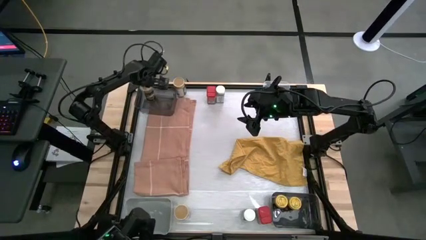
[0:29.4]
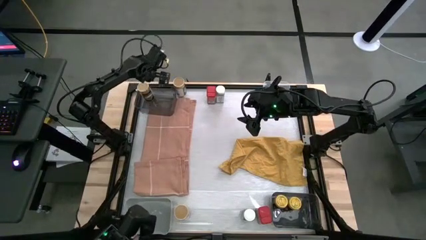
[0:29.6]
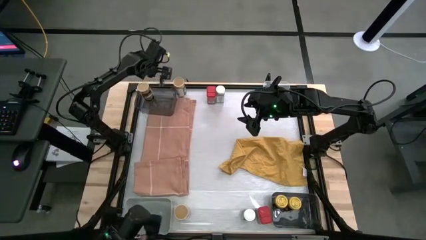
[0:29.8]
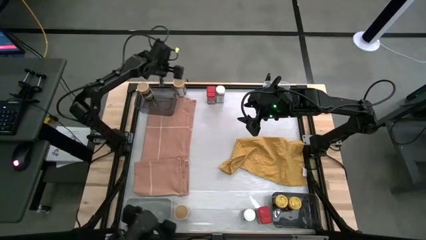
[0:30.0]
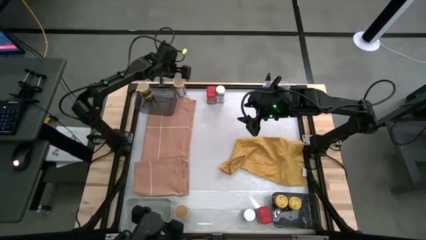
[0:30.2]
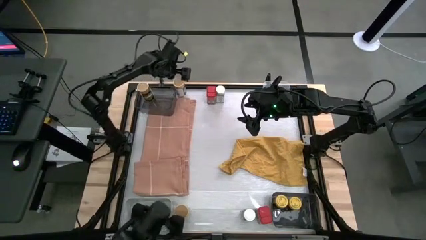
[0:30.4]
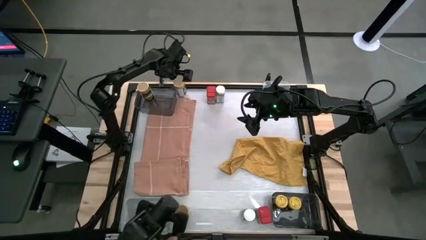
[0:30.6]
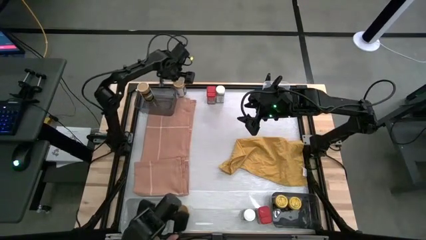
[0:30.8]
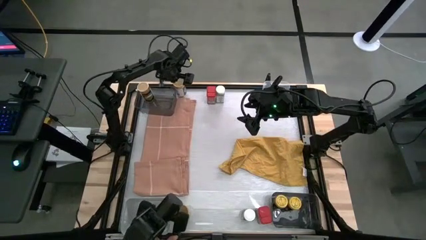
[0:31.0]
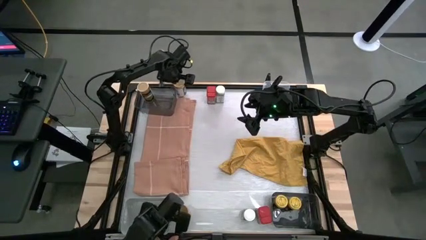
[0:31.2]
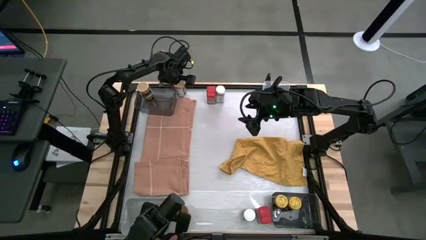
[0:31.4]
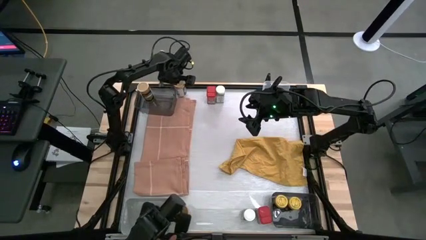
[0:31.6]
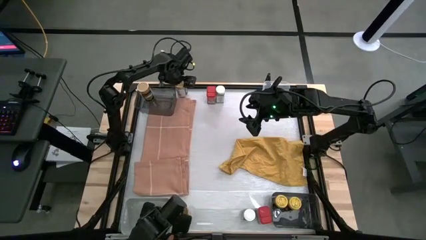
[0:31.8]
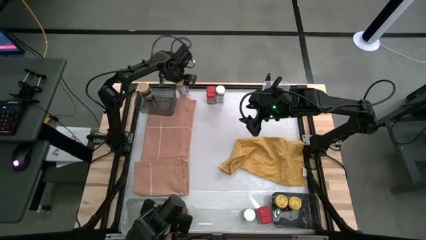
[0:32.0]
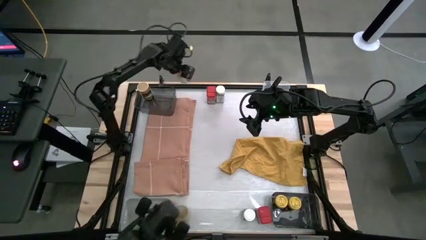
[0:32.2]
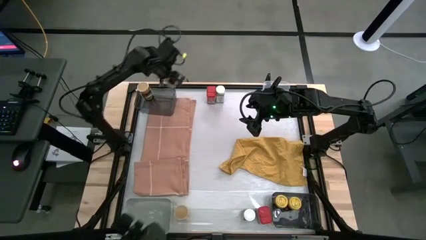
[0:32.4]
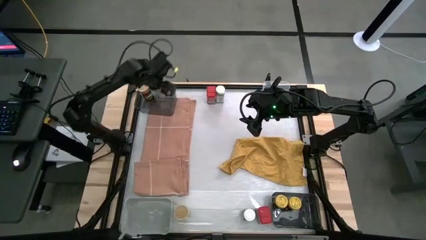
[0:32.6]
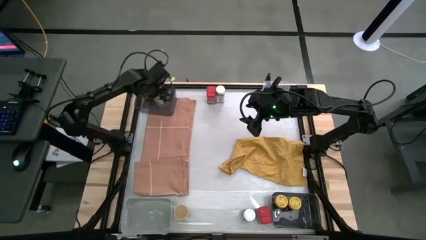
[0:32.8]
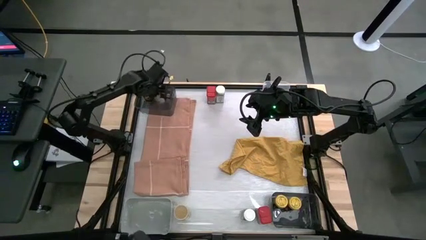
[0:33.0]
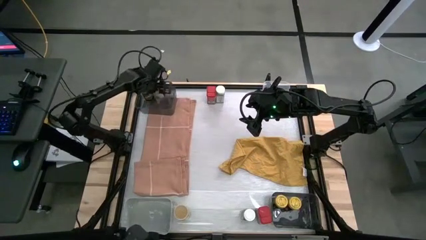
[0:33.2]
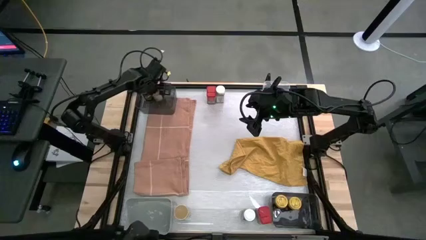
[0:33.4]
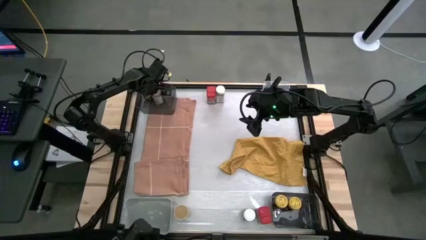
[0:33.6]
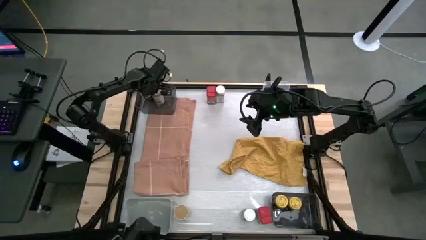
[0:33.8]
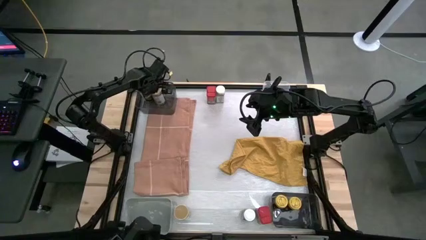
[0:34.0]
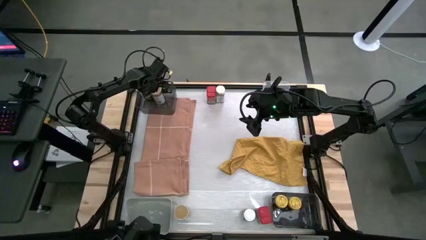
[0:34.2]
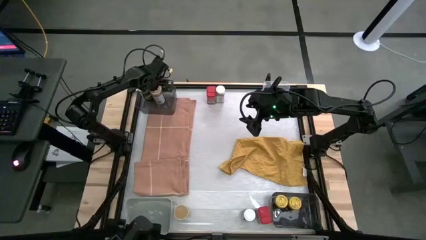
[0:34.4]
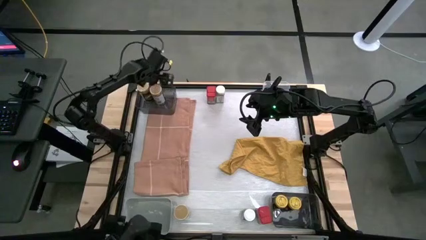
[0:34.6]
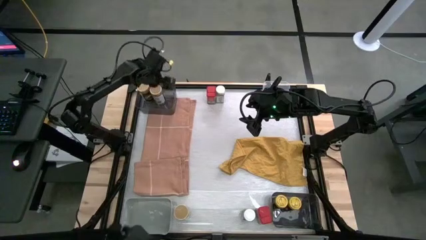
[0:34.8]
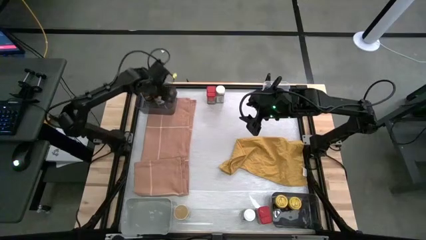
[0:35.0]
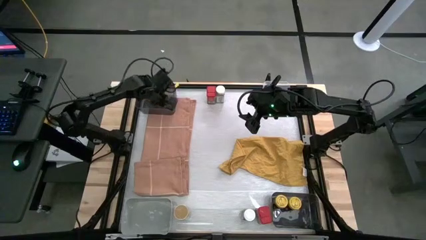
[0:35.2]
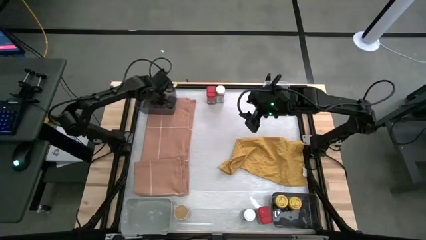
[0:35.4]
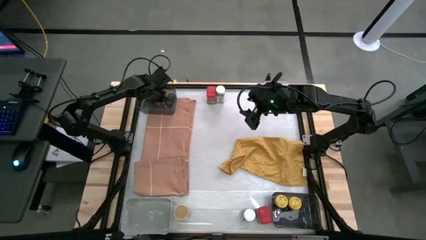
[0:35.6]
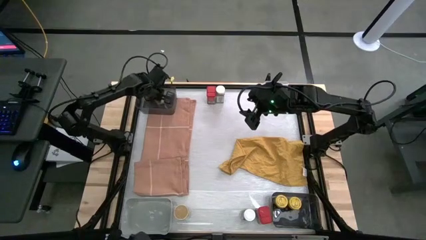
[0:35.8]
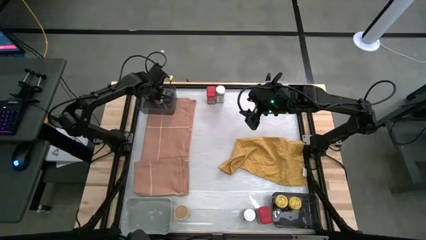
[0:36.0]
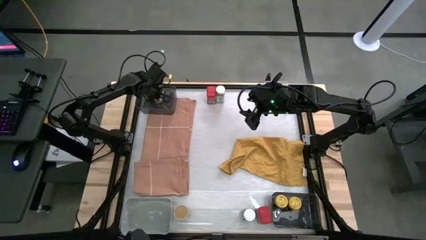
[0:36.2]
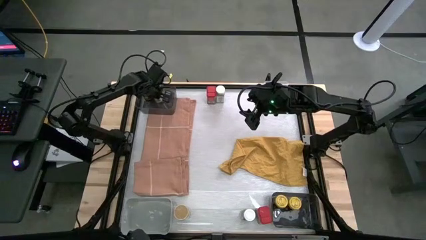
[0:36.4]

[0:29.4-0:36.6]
Task: Sort spices by type
Put the top gold seasoning bottle into the top black bin

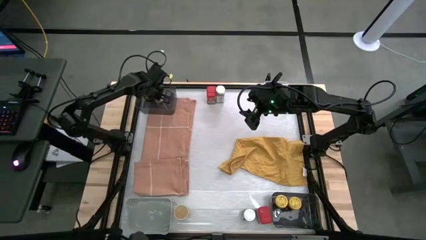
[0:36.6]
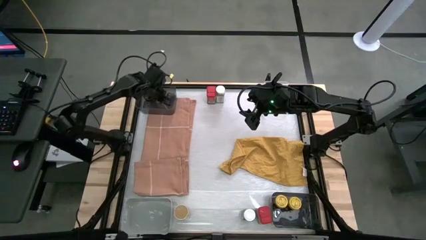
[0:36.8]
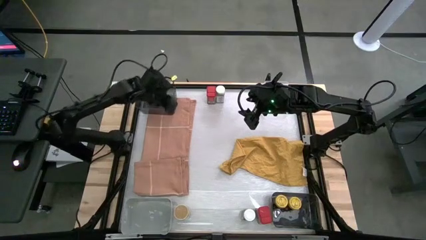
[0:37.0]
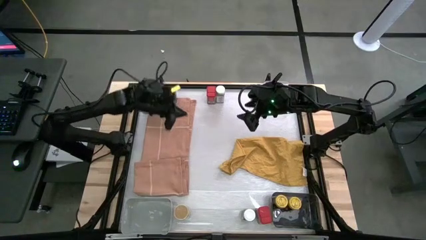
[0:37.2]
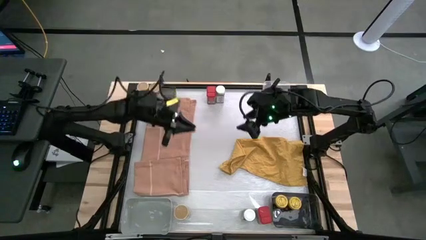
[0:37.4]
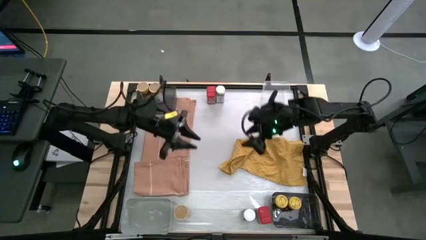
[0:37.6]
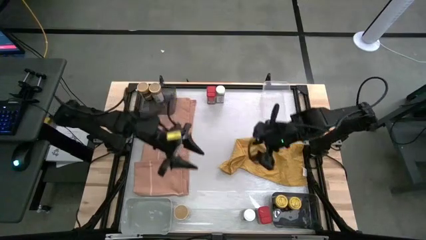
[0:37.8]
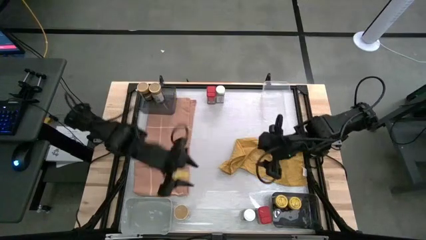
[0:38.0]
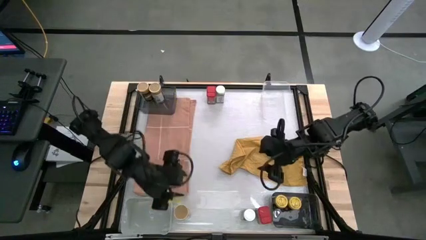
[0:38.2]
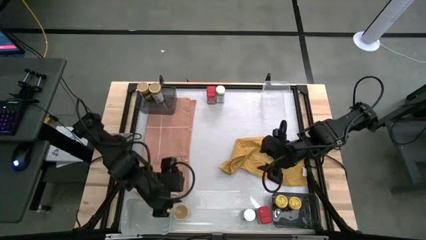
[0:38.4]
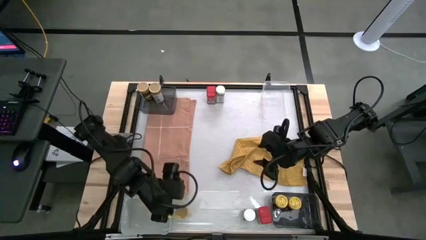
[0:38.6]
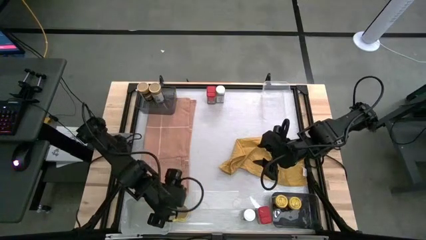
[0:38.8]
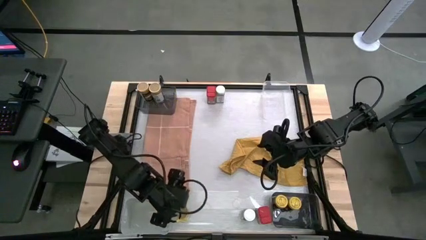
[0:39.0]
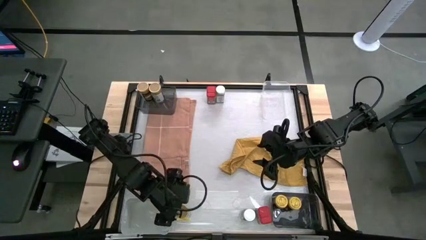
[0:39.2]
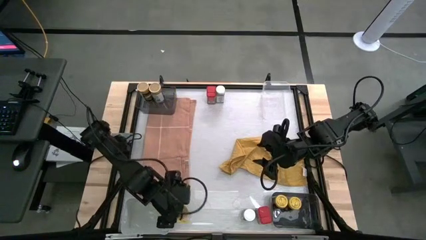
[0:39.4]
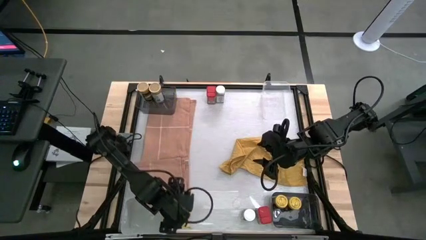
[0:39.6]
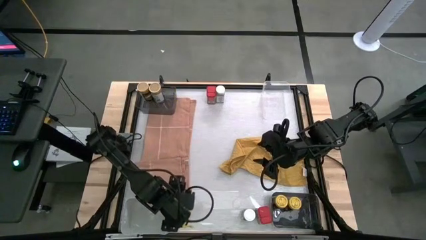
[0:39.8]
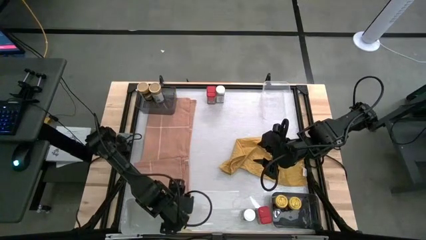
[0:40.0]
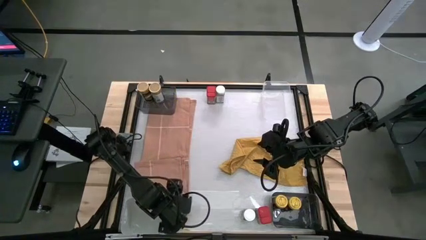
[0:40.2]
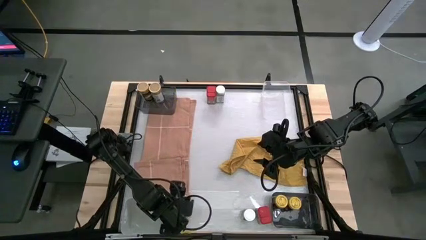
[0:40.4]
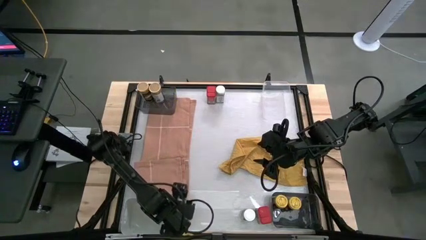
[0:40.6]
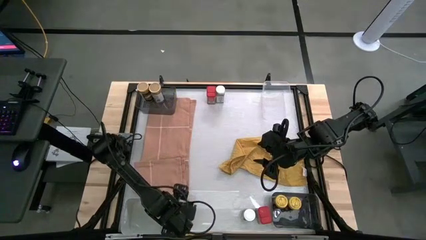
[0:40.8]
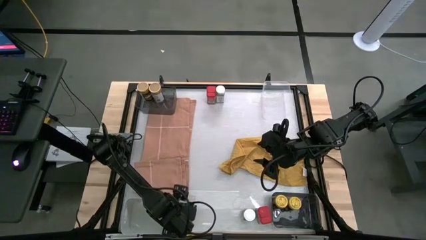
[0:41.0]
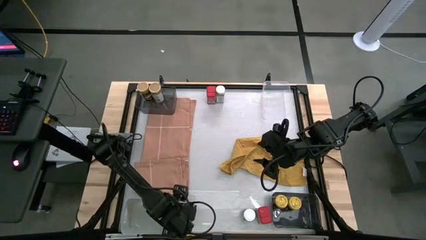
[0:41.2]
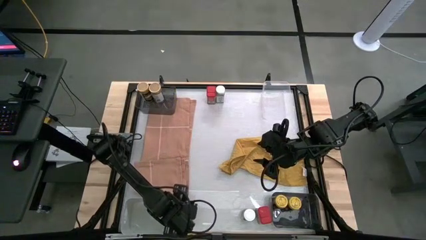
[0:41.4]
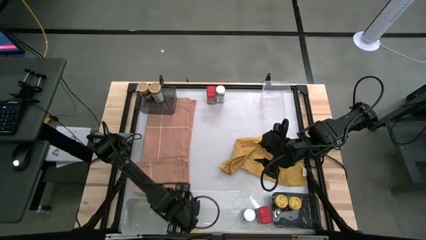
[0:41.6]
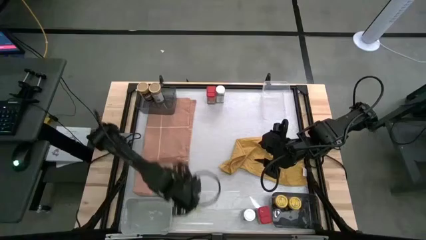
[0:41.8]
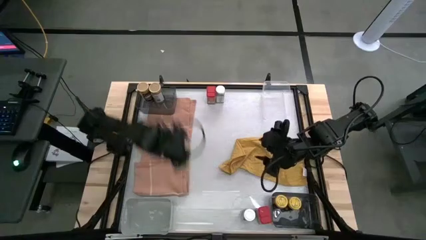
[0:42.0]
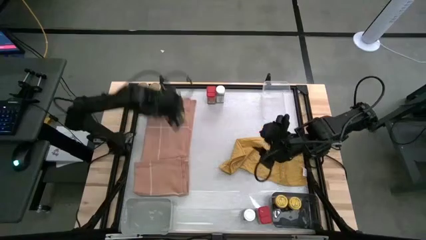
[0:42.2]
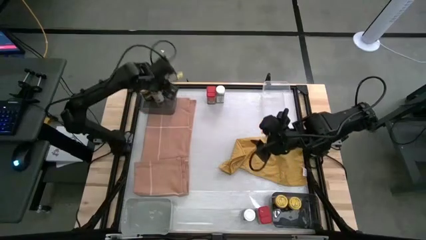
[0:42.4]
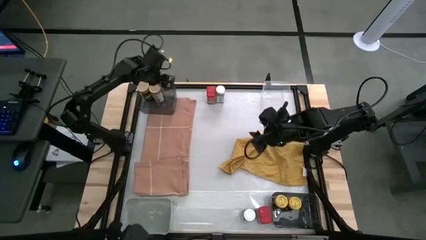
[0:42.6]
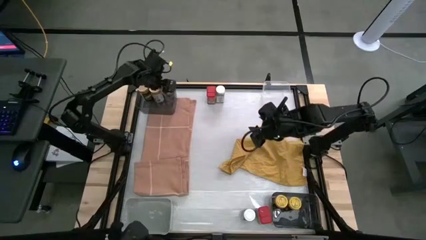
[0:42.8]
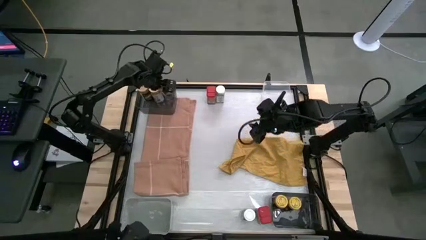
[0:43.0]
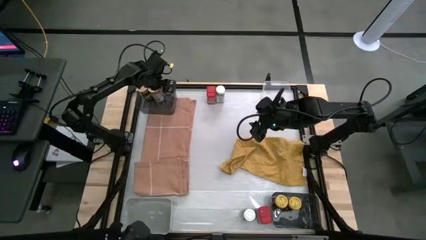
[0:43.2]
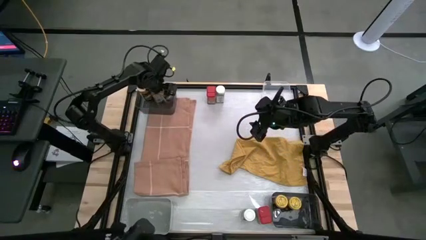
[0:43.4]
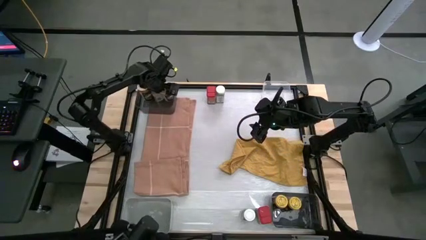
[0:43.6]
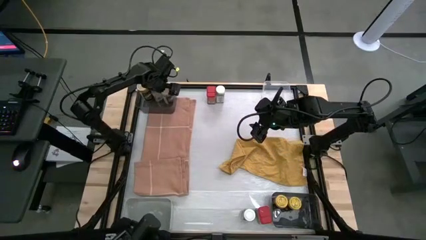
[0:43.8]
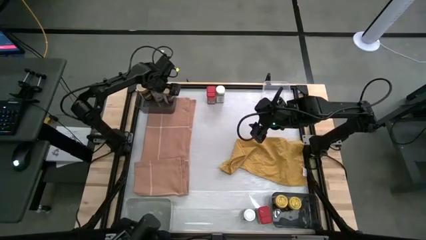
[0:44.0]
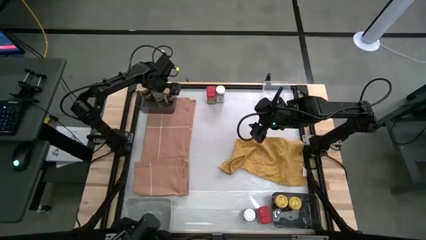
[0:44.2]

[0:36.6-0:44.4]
Put the gold seasoning bottle into the top black bin

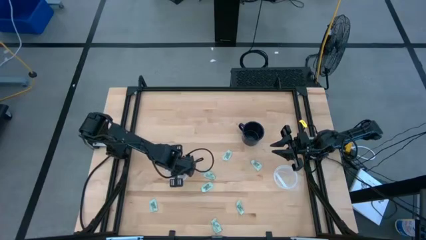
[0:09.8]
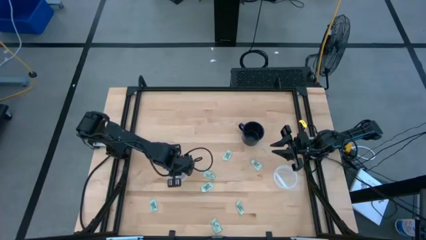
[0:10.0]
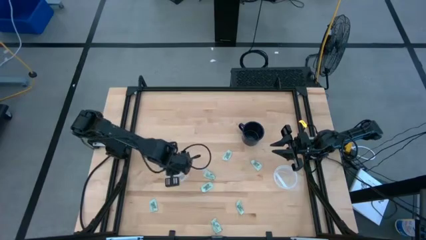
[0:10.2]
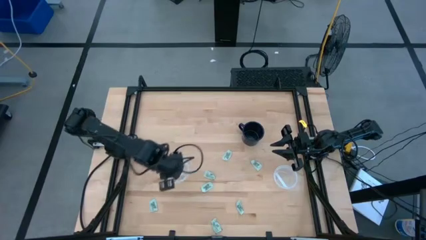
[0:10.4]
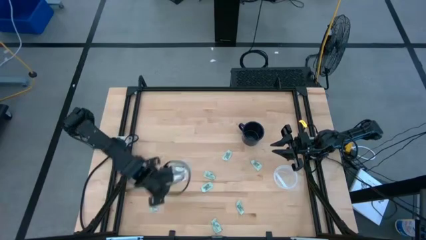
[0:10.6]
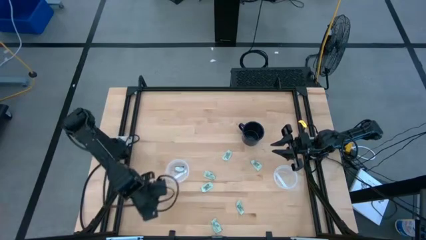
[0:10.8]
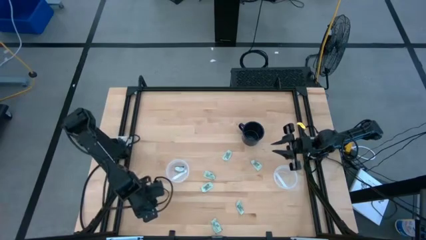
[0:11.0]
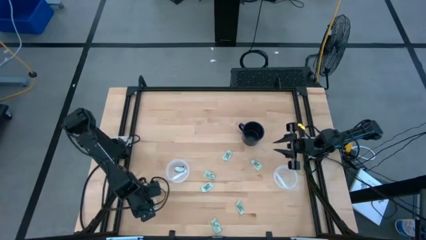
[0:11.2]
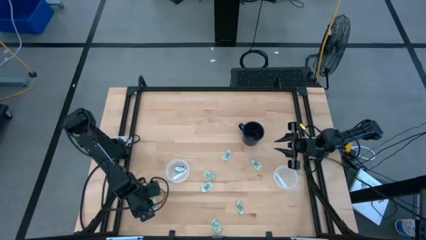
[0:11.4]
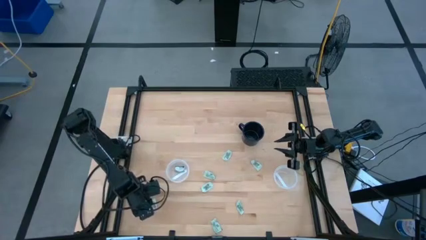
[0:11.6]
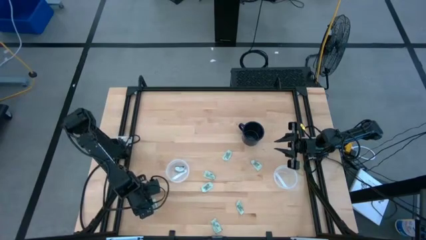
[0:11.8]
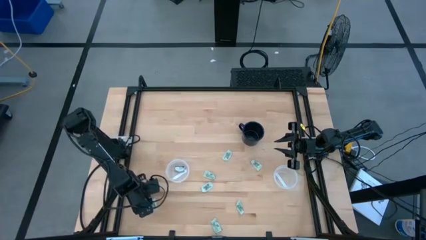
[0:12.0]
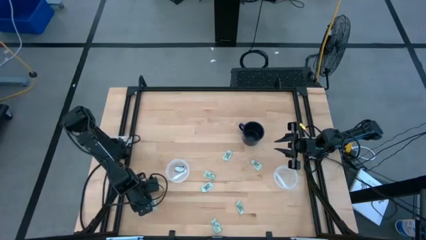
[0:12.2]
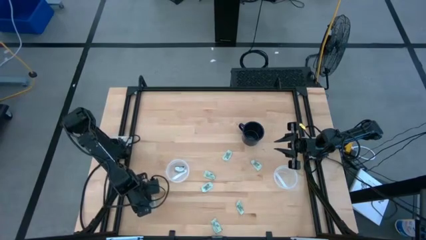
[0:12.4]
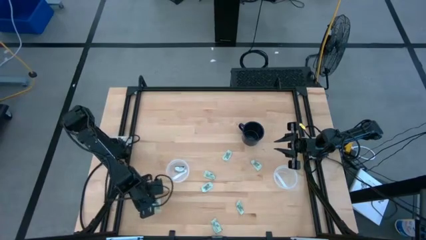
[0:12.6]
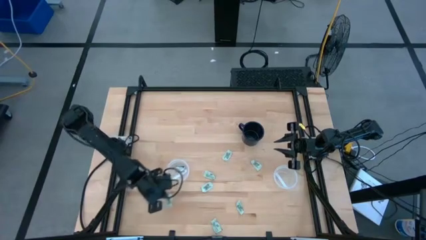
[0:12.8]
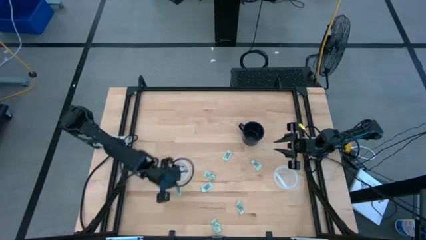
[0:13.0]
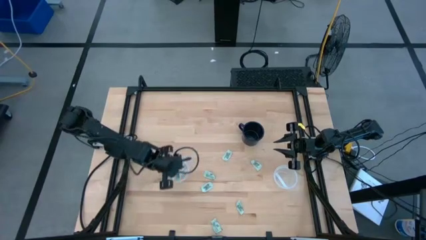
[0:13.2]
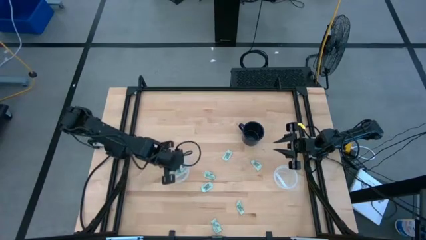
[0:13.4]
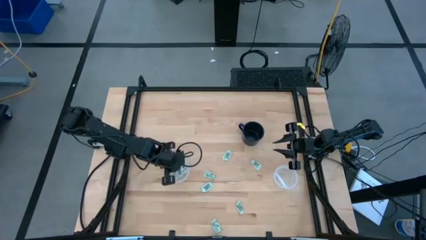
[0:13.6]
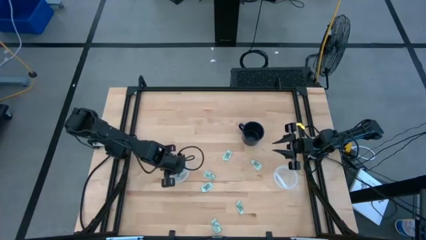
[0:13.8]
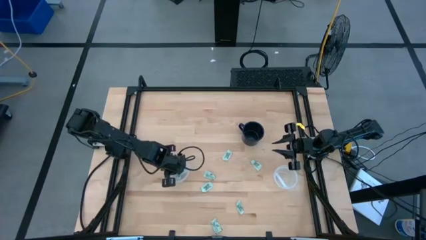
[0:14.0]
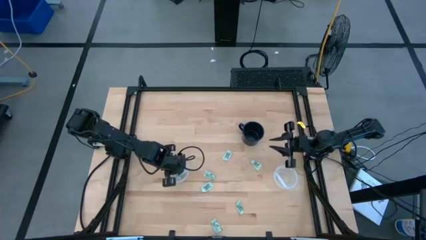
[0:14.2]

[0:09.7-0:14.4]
Task: Pick and place Stevia / Truvia into bins
Put the stevia packet into the left transparent plastic container
